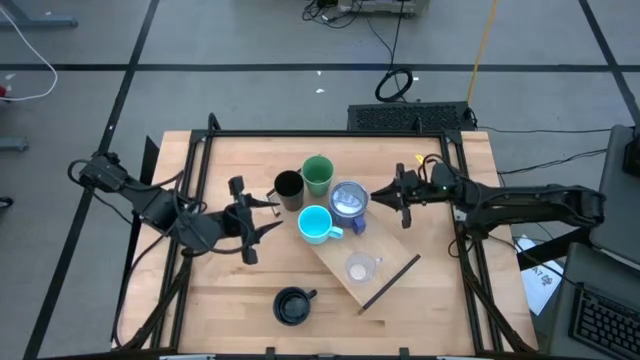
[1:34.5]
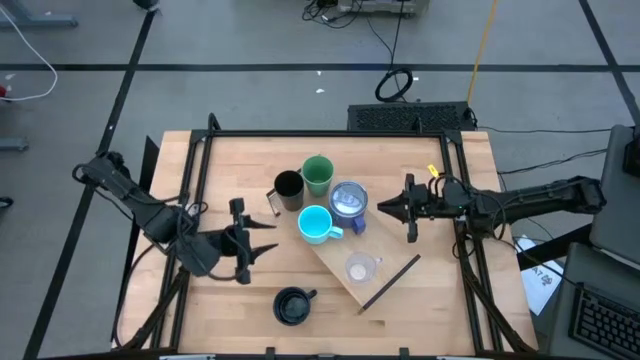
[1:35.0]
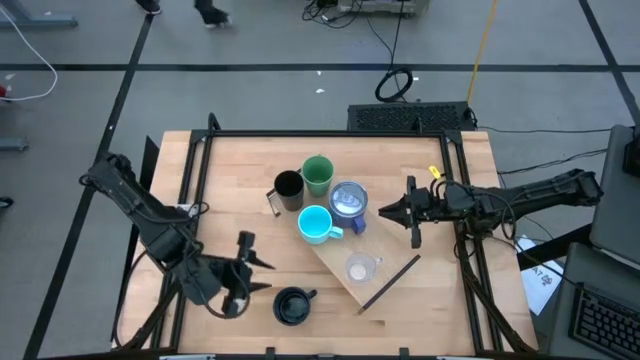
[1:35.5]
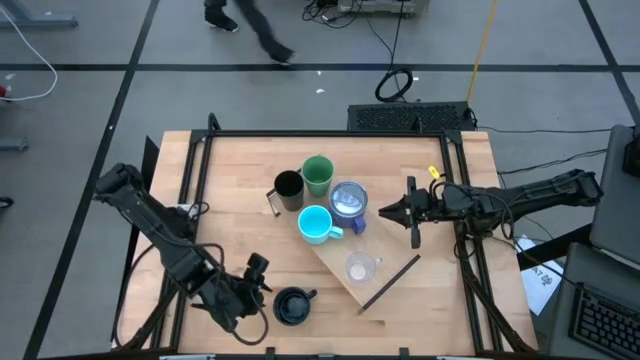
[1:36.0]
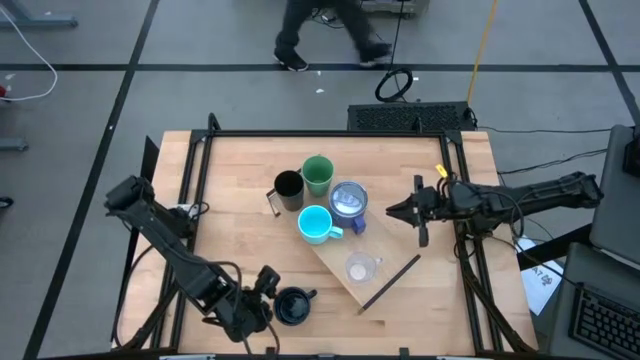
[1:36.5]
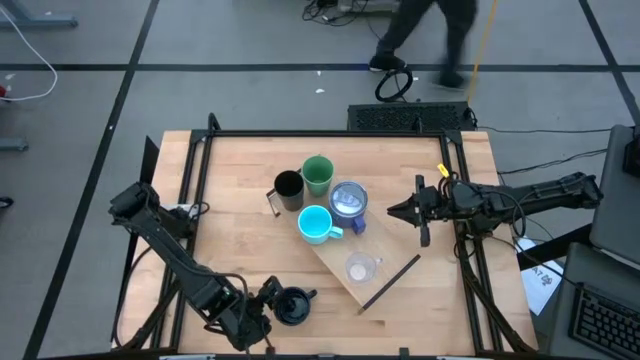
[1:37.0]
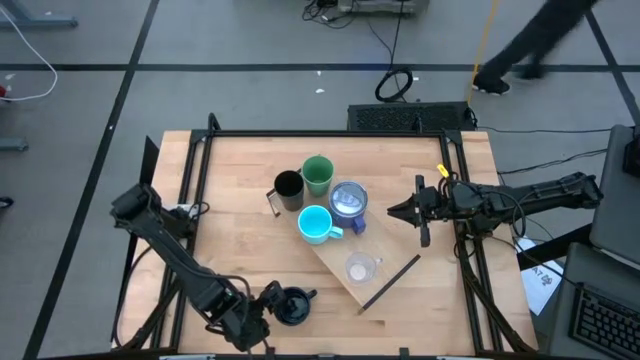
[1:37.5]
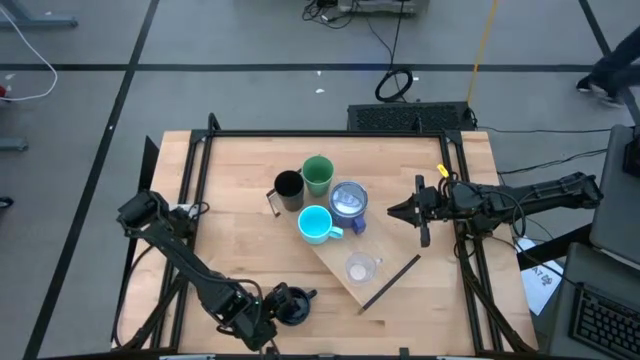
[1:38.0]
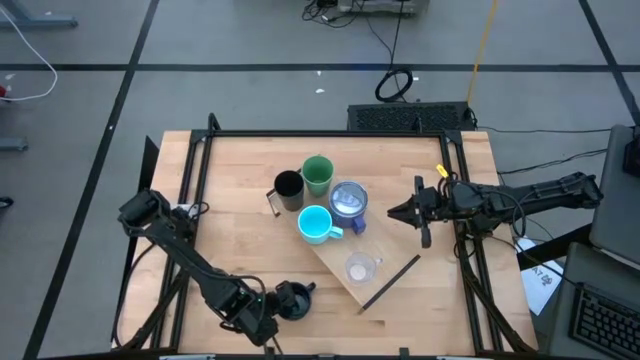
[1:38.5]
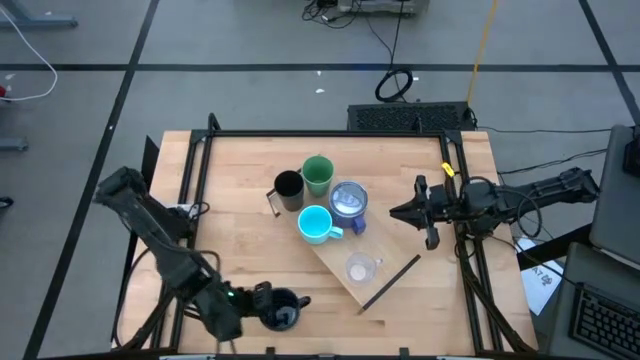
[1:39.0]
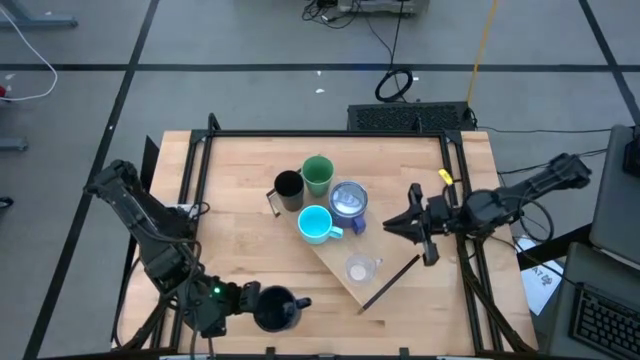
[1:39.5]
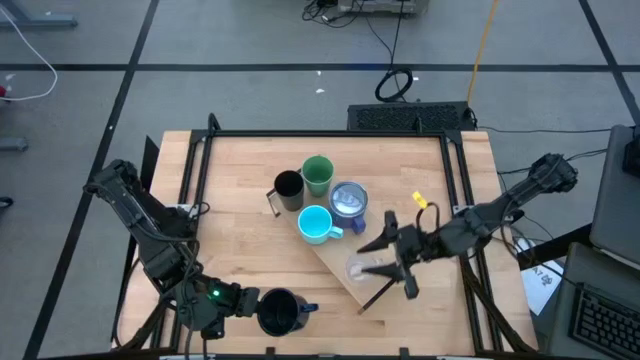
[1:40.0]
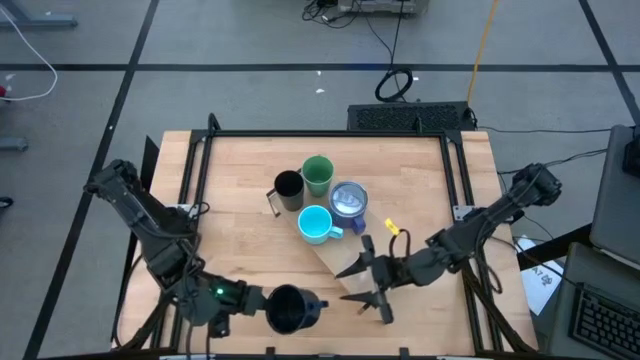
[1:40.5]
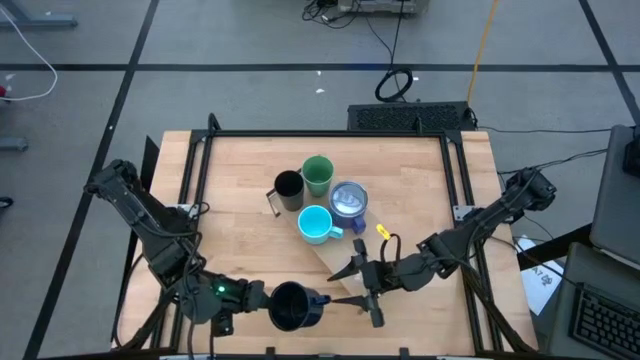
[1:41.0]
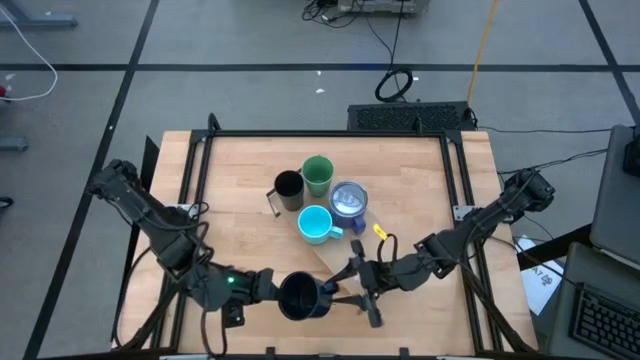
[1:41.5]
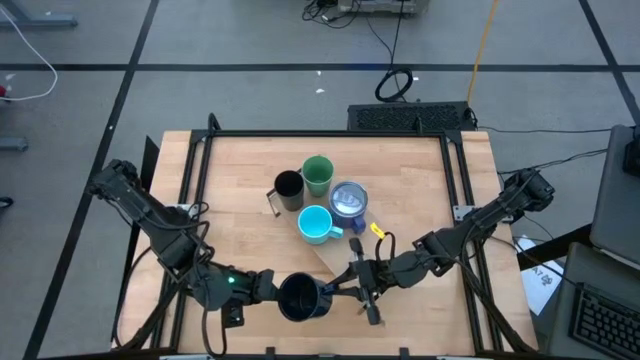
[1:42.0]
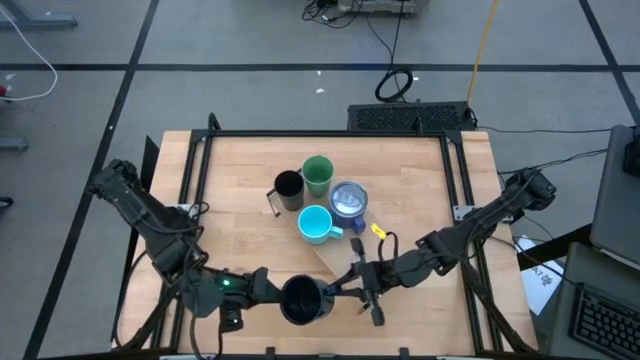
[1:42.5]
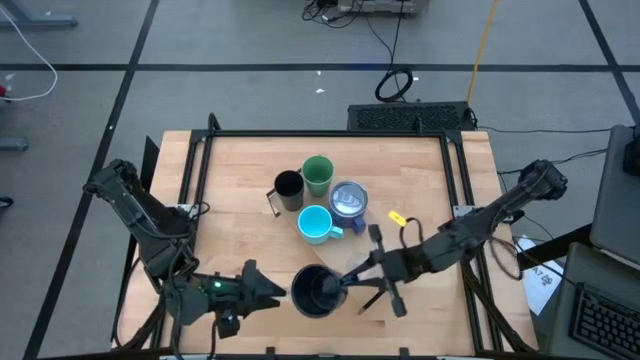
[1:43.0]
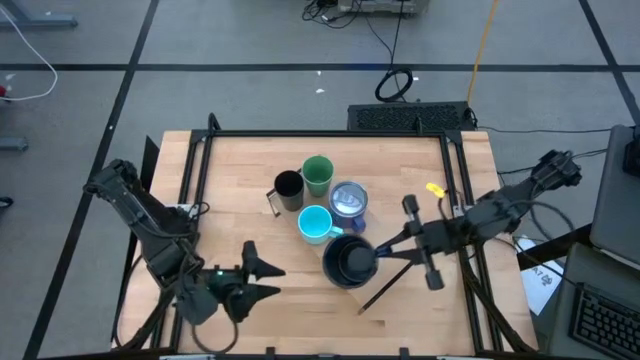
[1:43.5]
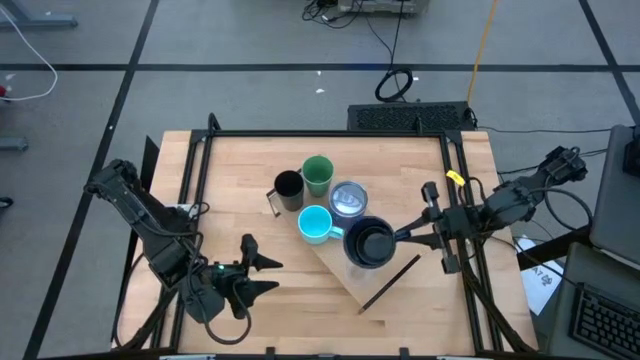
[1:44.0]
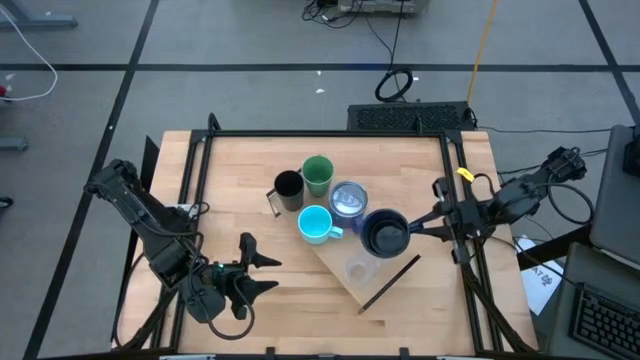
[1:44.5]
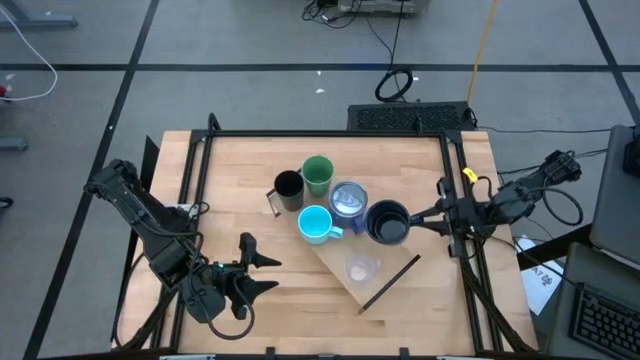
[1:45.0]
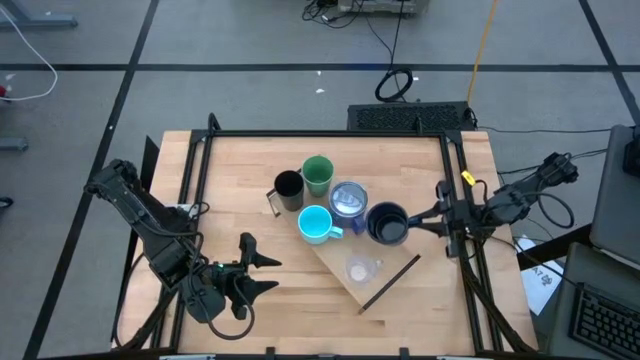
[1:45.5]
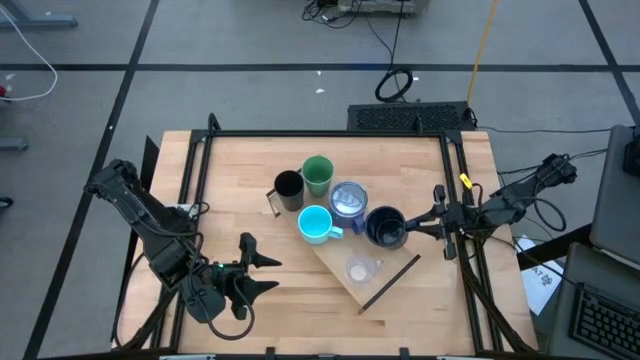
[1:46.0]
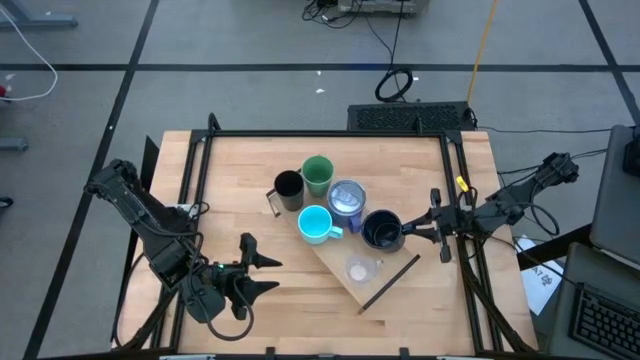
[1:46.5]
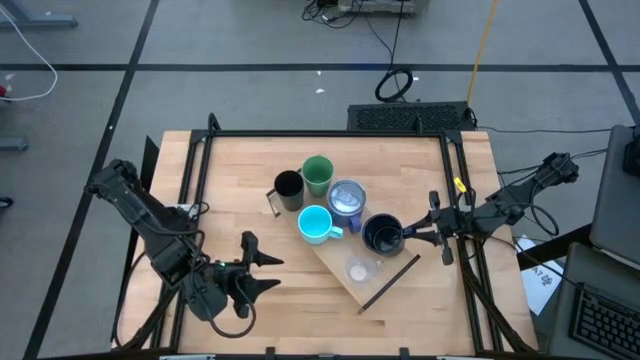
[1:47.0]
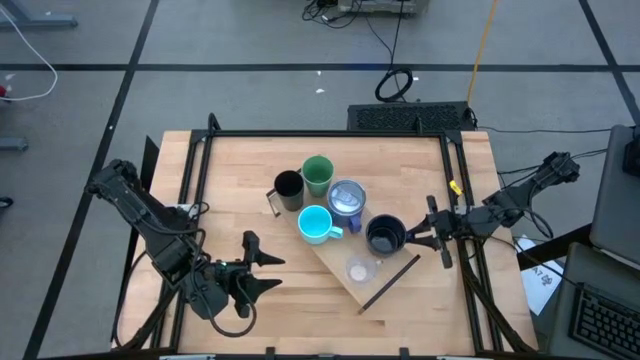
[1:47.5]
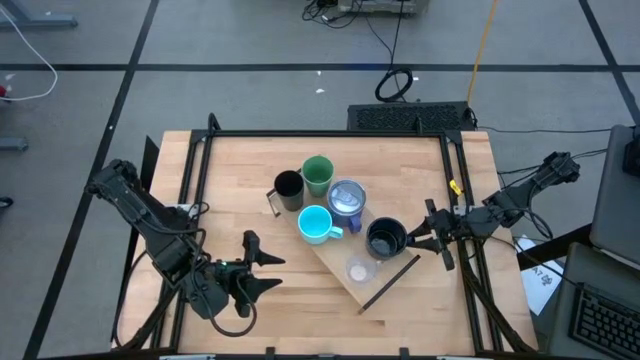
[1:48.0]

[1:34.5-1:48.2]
Task: Stack small to large cups/mugs on shelf
Put the dark blue mug on the shelf

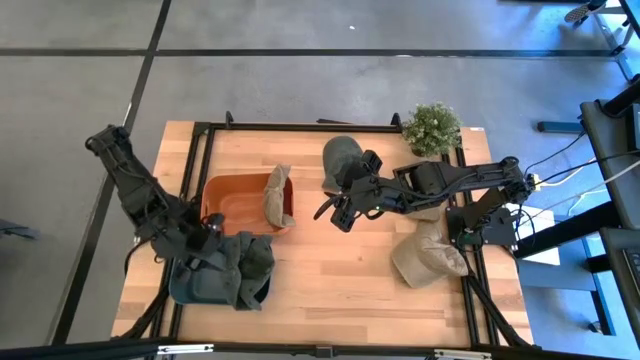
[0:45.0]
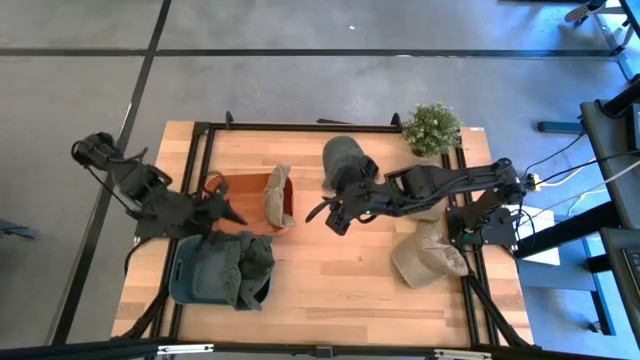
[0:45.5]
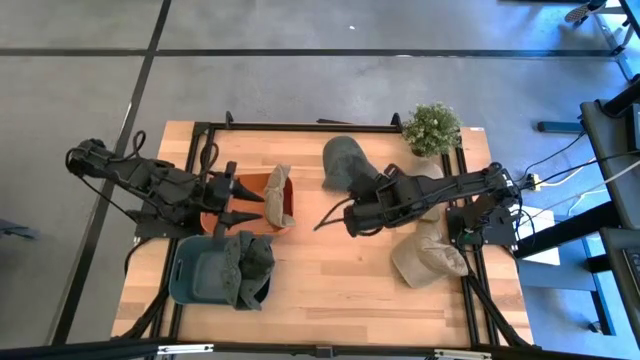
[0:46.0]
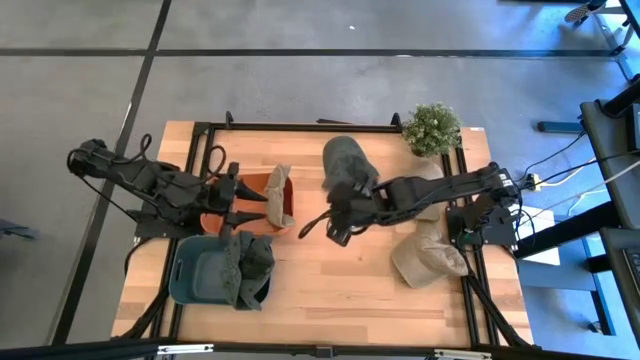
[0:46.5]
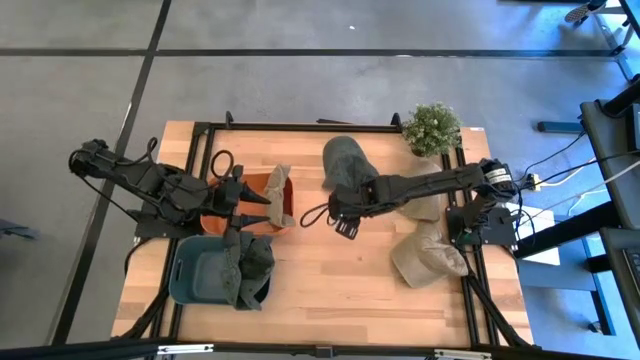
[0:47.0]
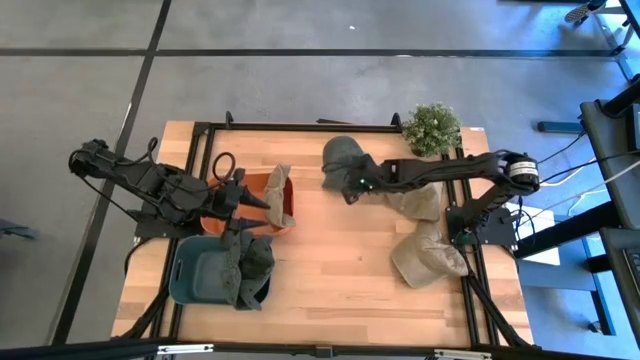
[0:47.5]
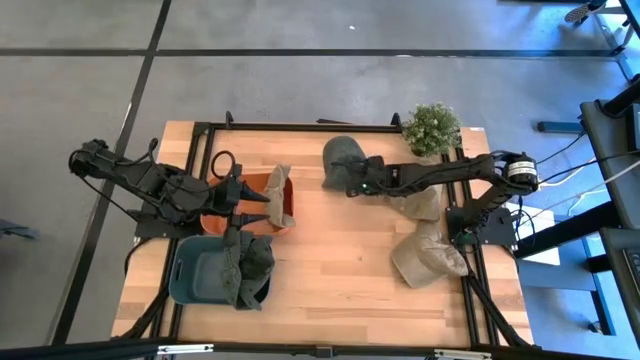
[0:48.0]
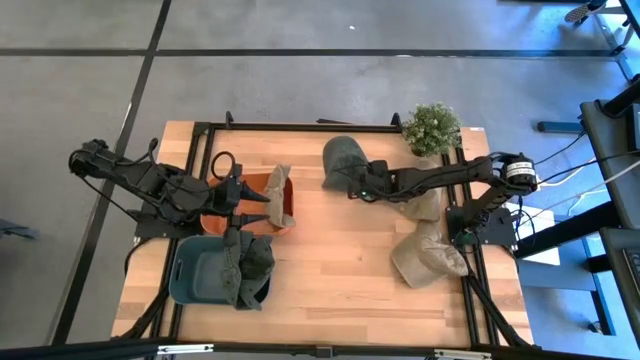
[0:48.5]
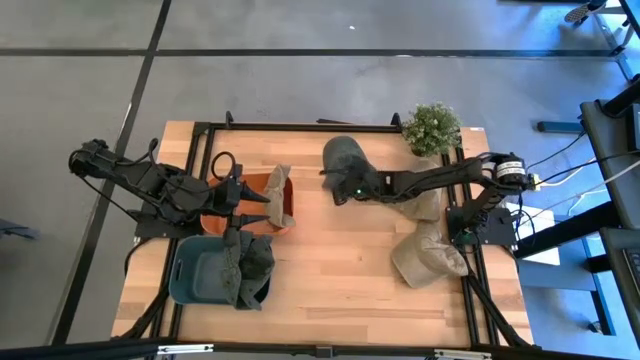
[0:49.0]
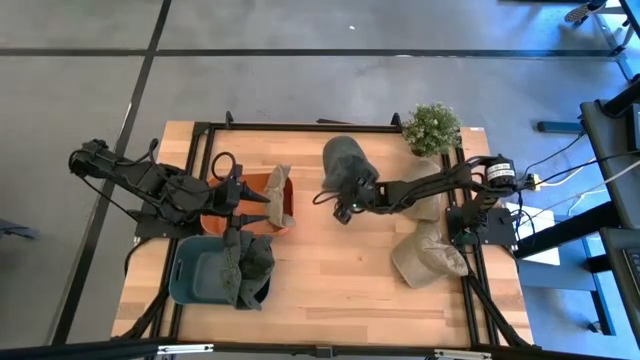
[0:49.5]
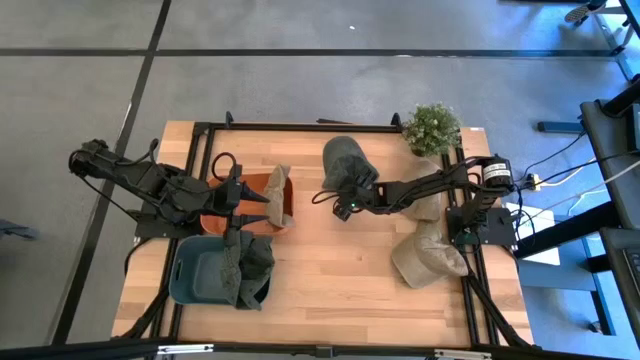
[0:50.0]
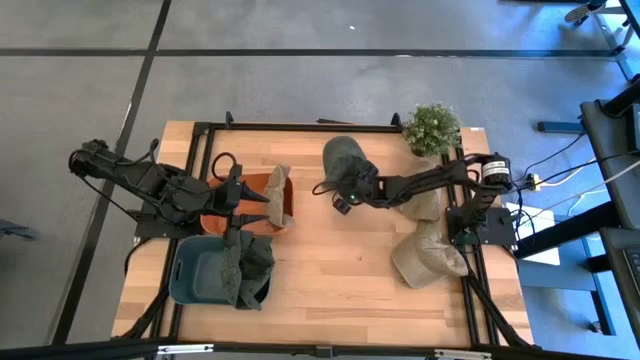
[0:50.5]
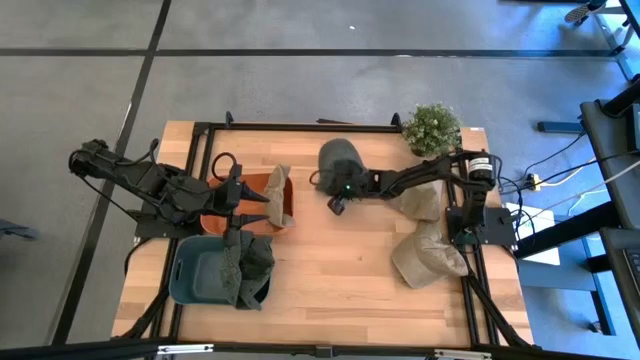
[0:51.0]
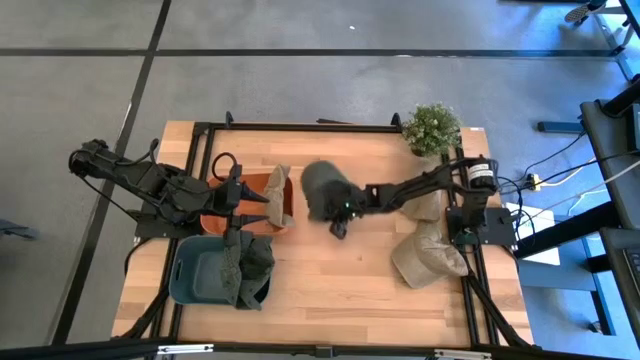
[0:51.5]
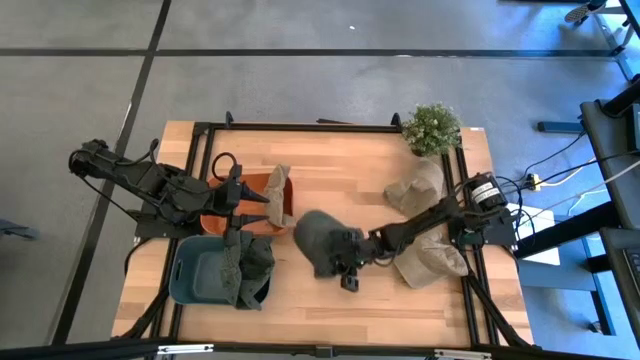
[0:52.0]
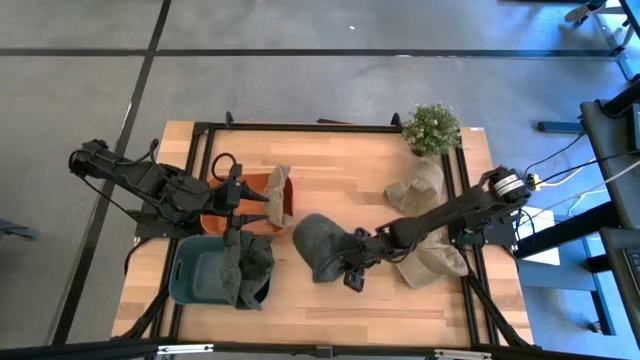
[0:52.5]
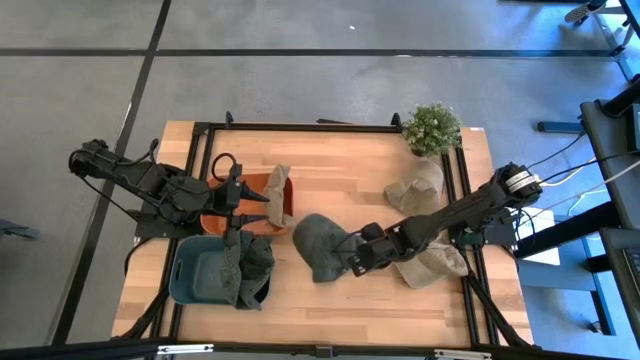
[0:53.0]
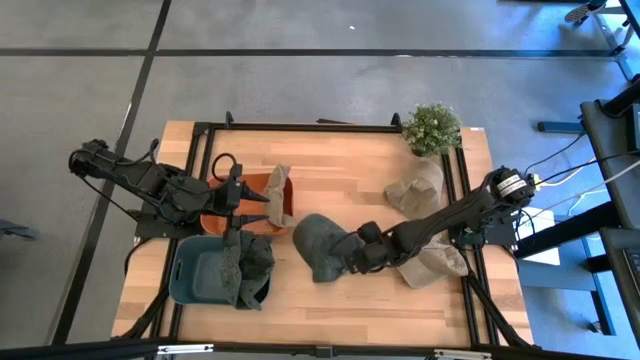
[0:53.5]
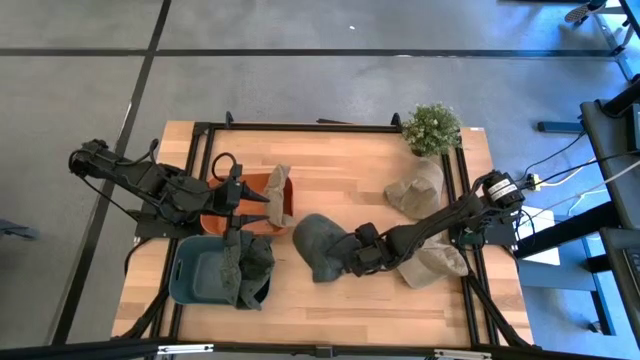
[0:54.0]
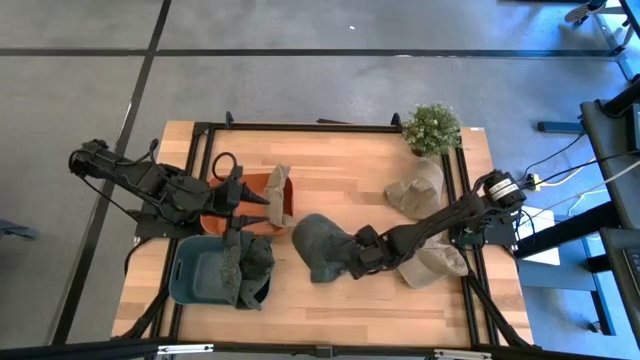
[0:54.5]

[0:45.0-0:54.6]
Task: Pick & Place hat
Put the gray cap into the blue bin
